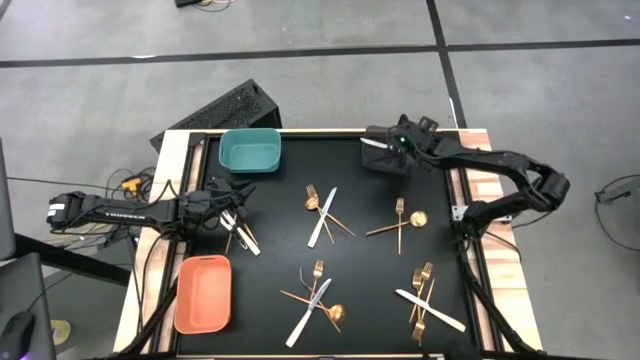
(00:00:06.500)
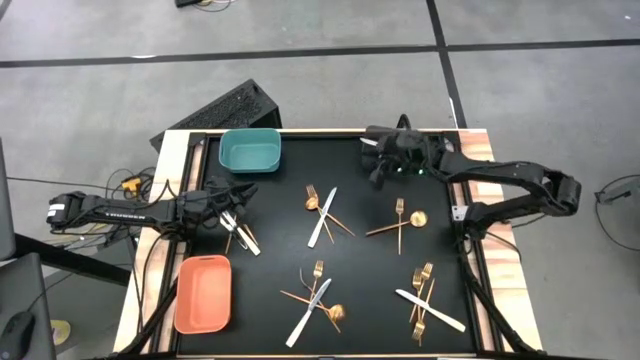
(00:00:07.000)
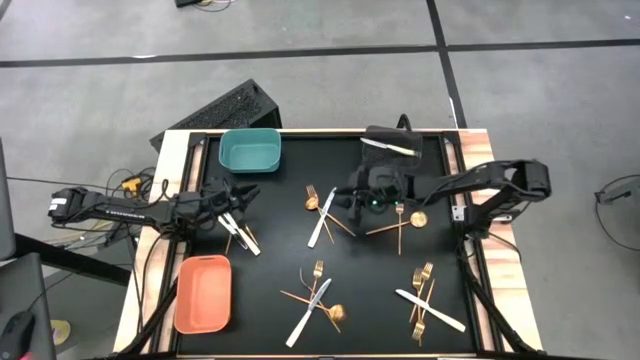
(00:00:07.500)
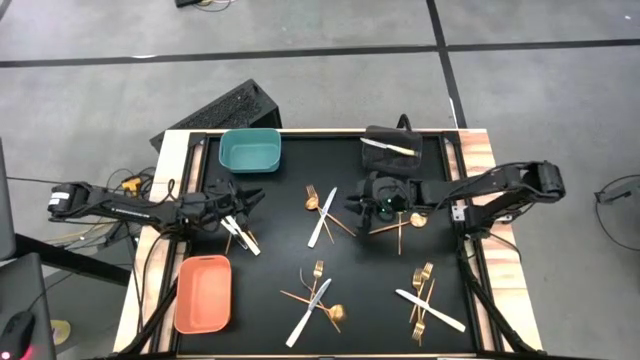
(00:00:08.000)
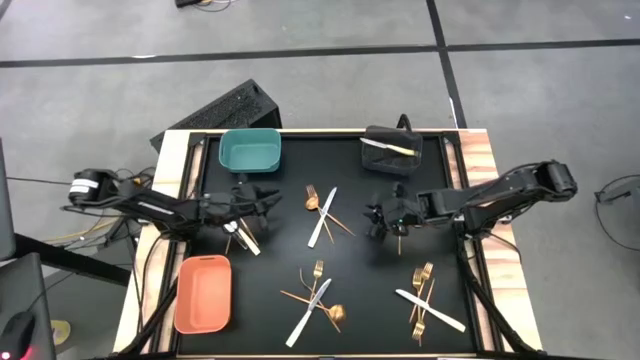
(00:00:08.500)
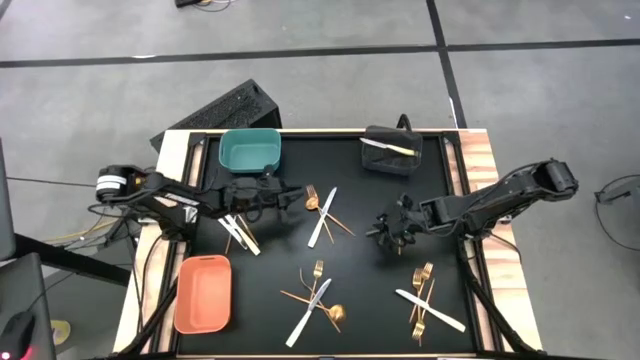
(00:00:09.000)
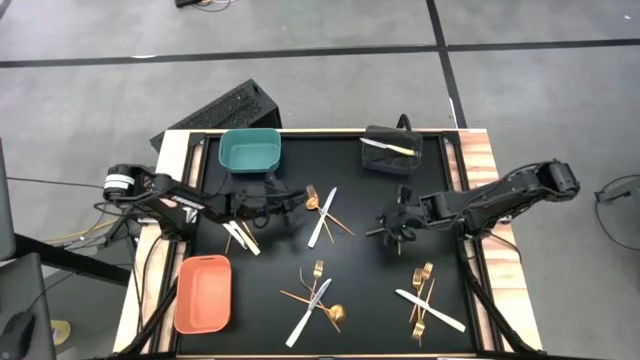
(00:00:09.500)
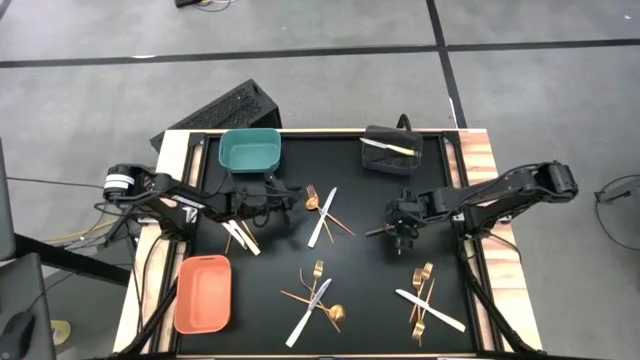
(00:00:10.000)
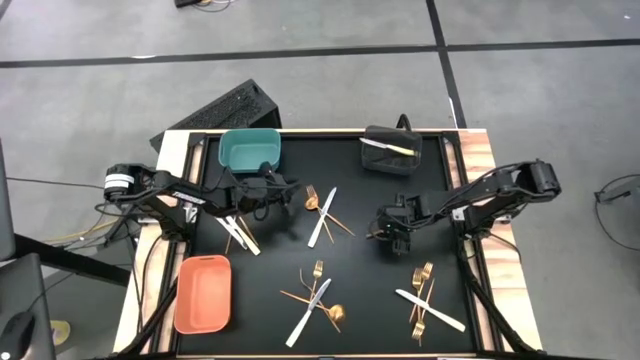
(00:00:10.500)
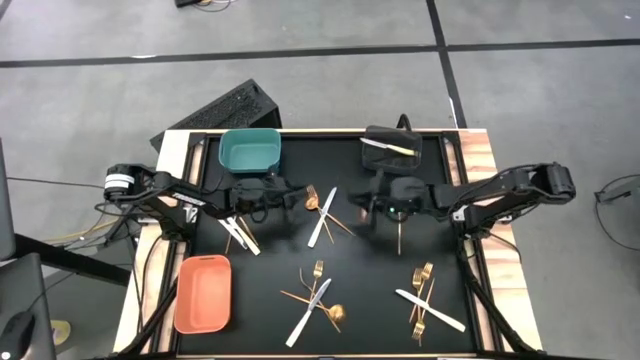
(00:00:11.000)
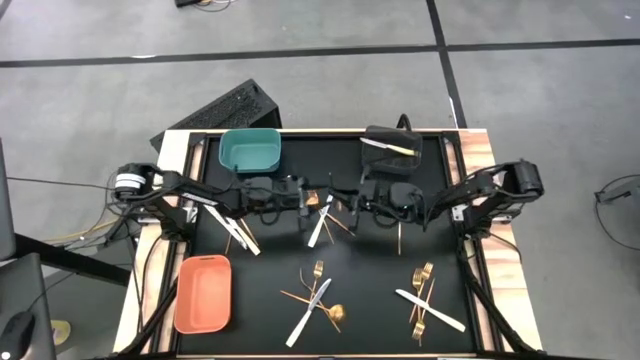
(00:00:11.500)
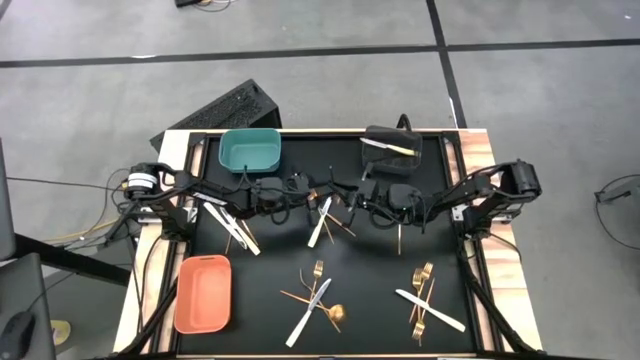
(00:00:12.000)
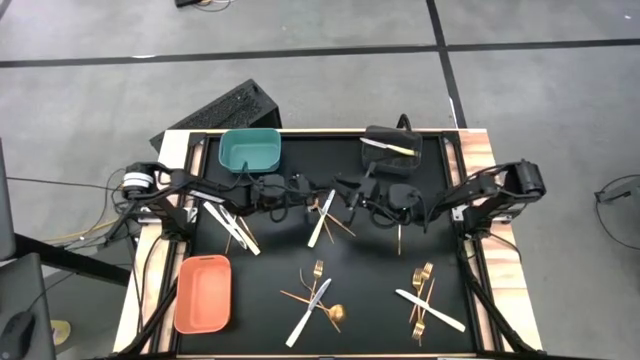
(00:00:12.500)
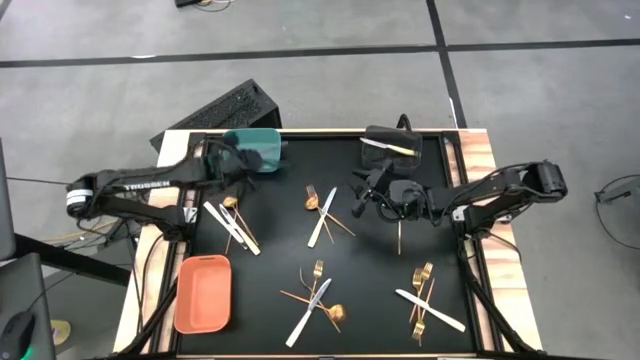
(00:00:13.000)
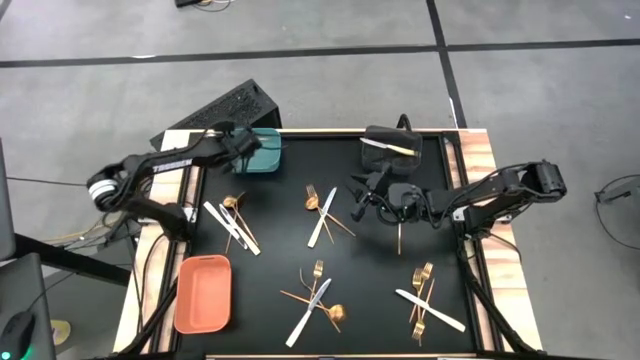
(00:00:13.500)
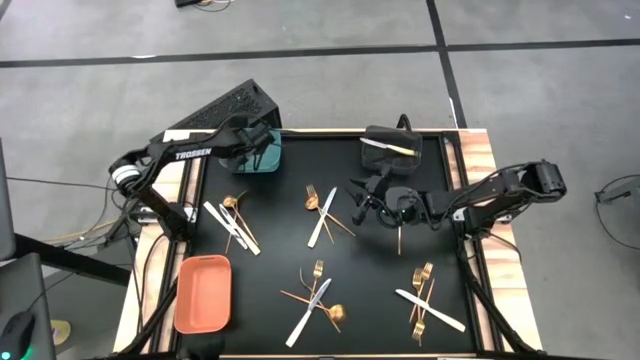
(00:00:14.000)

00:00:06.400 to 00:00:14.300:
Task: Sort silverware by color (type)
Put the gold spoon into the green bin

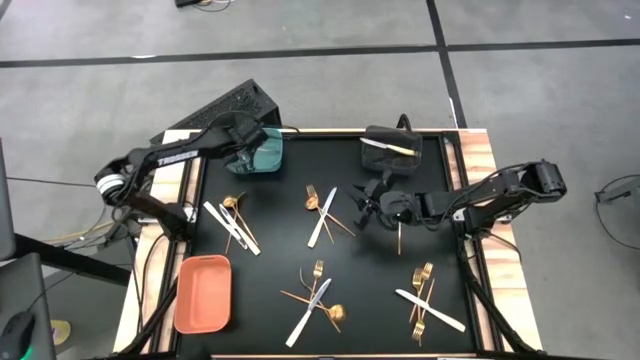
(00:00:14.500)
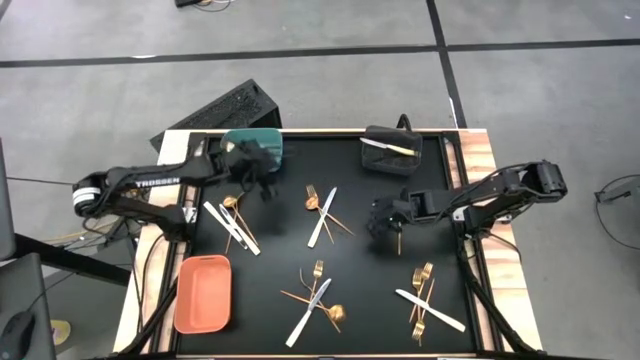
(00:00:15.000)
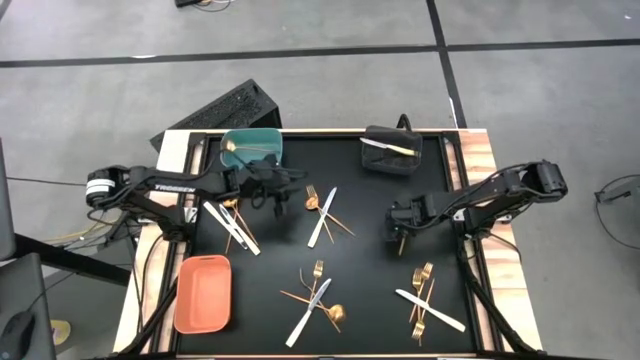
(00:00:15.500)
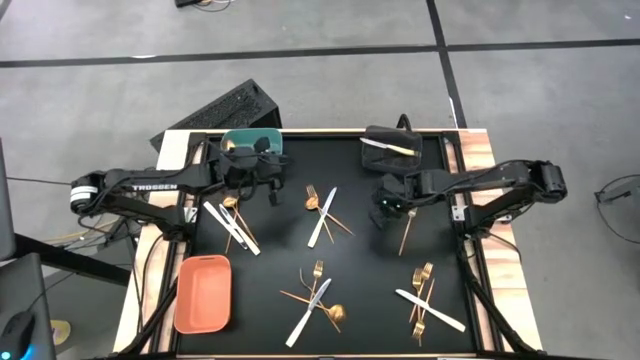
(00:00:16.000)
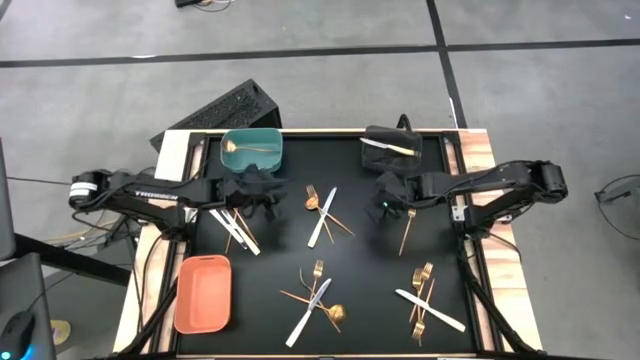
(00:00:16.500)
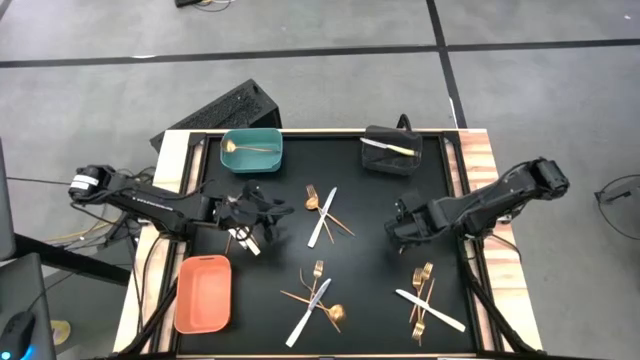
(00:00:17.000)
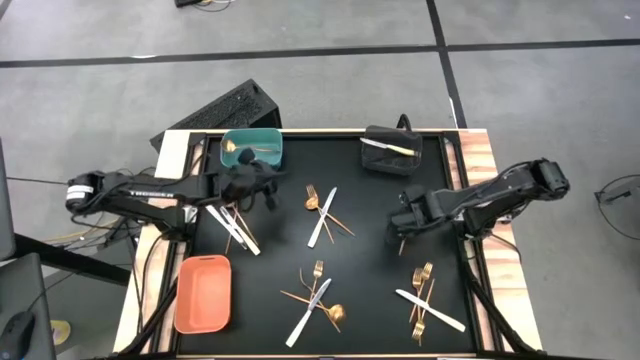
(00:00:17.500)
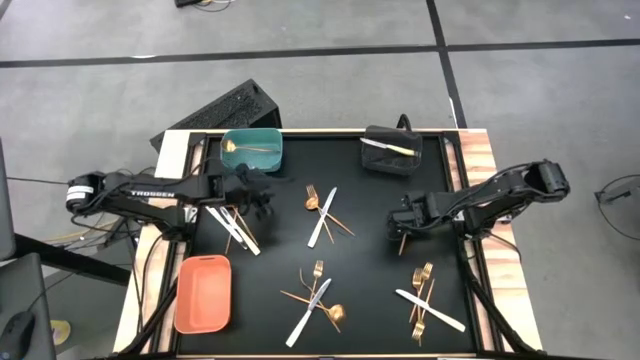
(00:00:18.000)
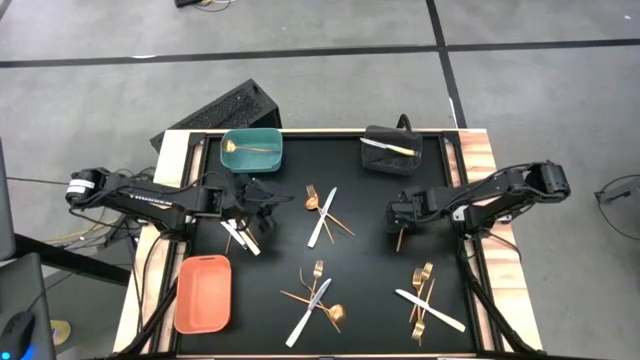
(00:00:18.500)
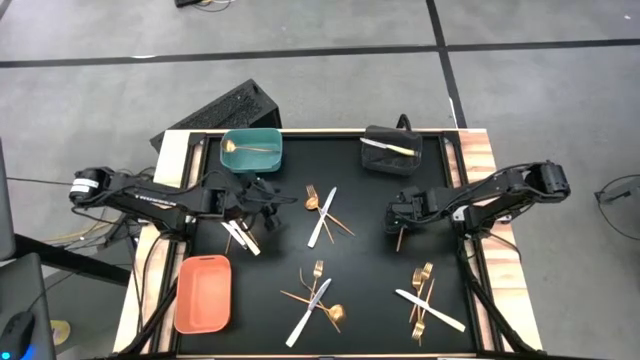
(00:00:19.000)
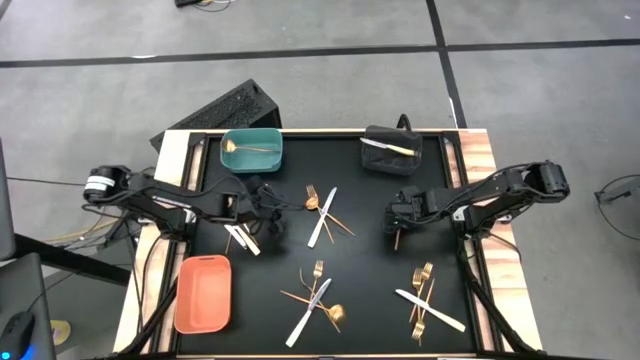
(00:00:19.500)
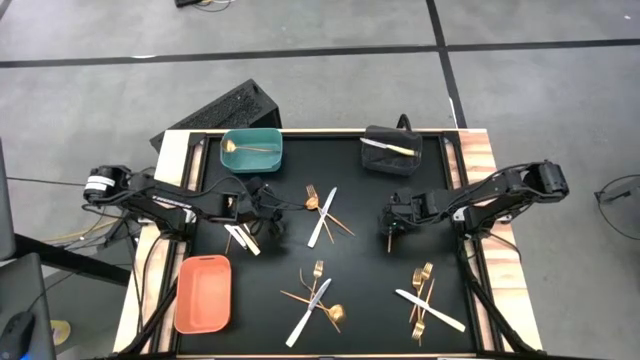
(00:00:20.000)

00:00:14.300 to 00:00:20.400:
Put the gold fork into the orange bin

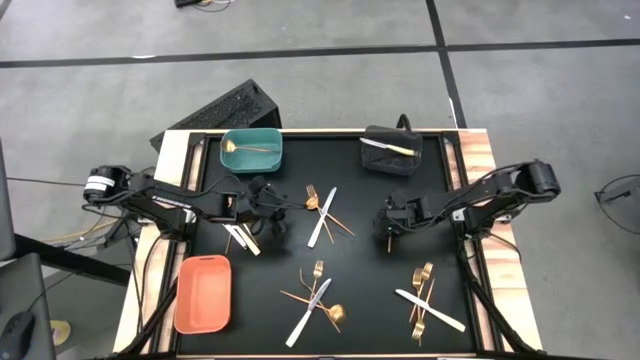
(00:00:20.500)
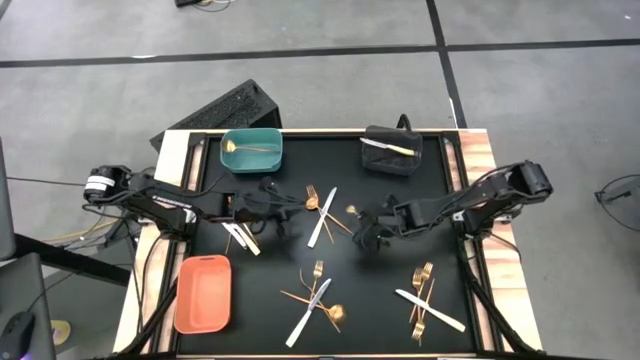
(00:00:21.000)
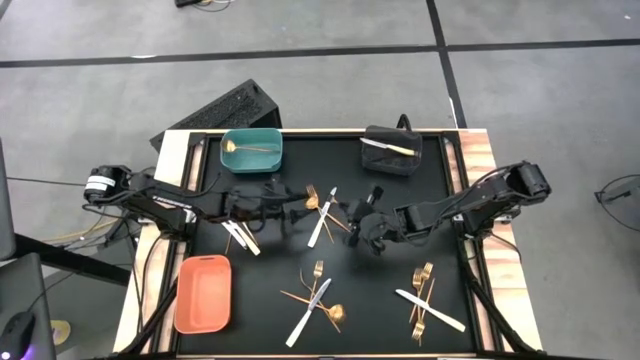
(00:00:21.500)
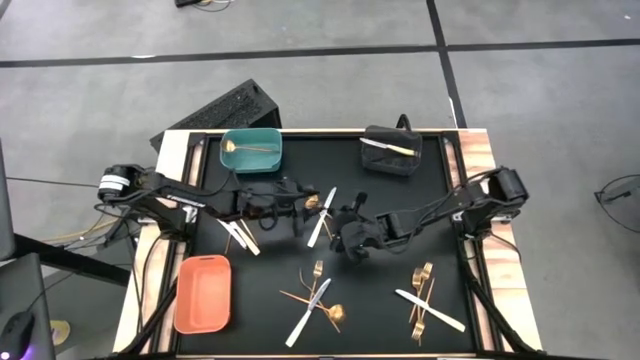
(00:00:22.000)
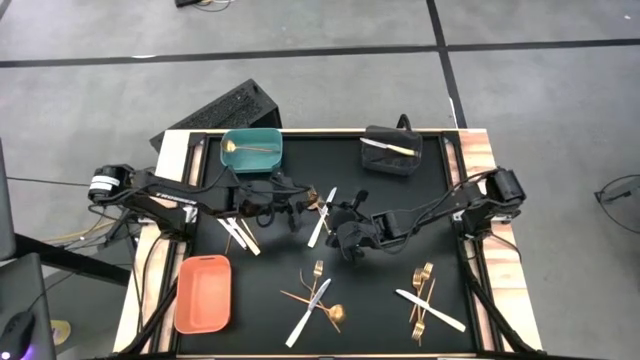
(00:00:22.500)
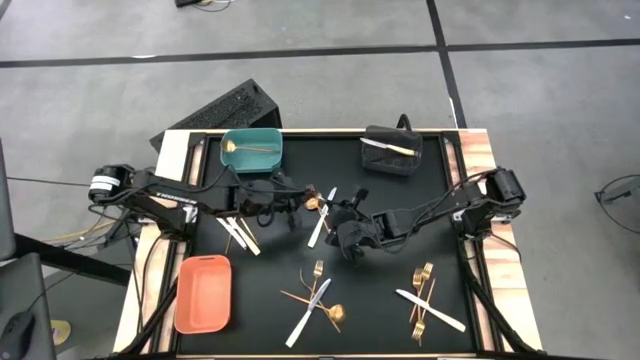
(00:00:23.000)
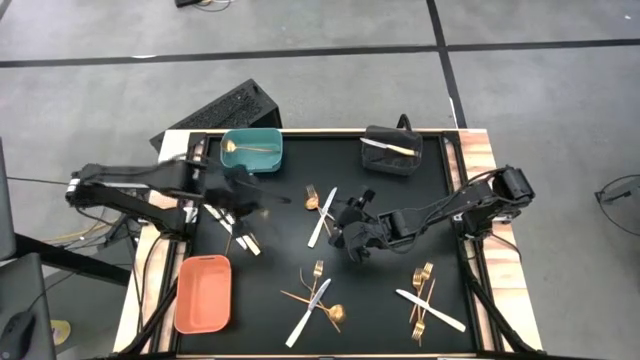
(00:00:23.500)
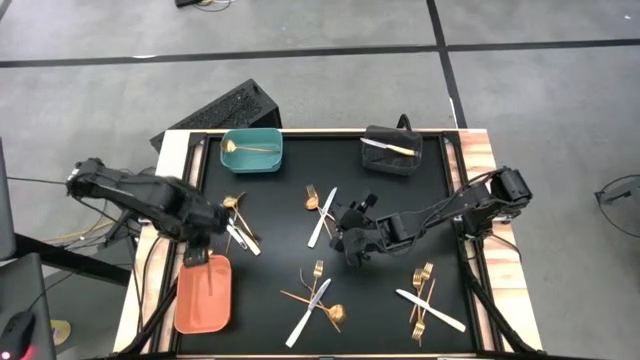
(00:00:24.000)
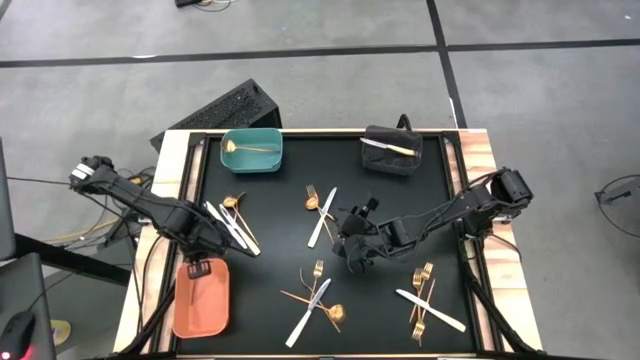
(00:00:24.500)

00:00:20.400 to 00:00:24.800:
Put the gold fork into the orange bin

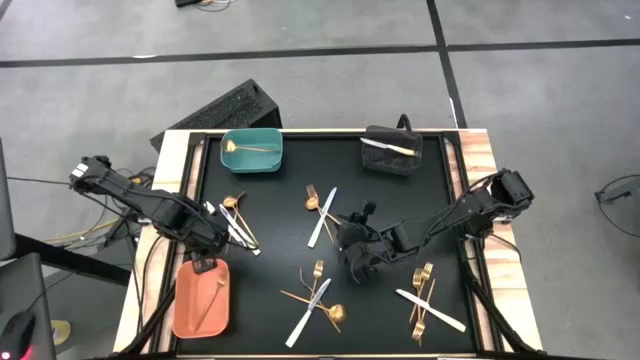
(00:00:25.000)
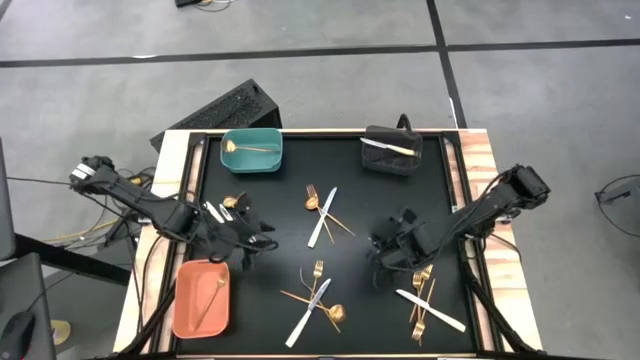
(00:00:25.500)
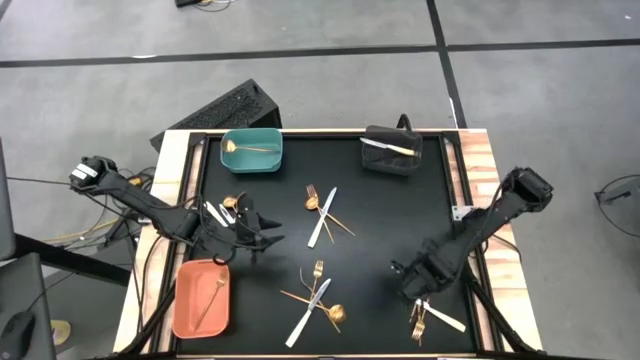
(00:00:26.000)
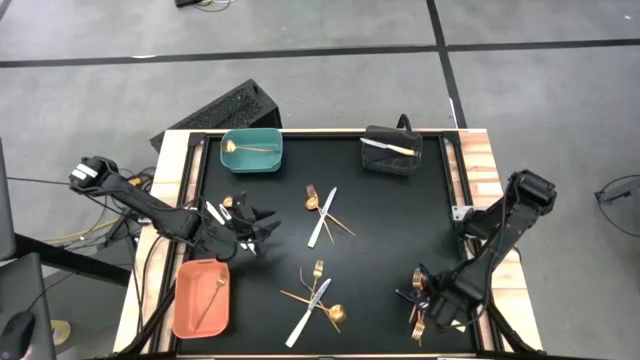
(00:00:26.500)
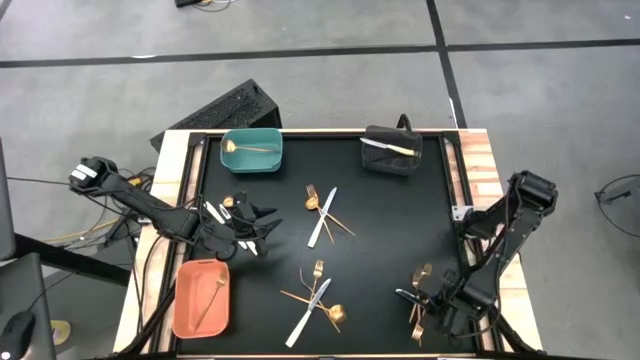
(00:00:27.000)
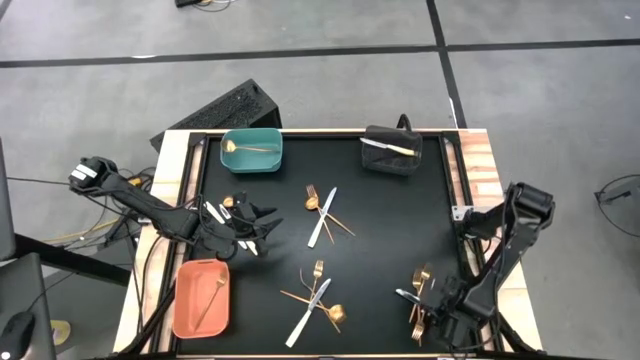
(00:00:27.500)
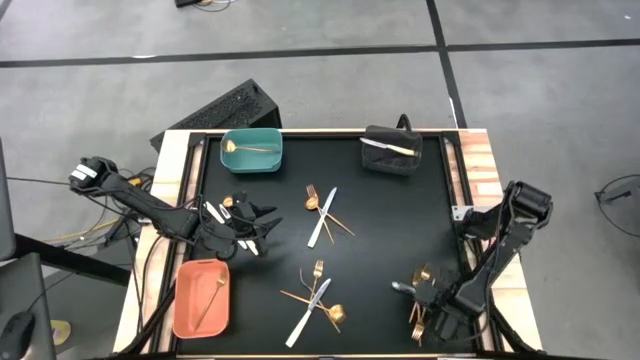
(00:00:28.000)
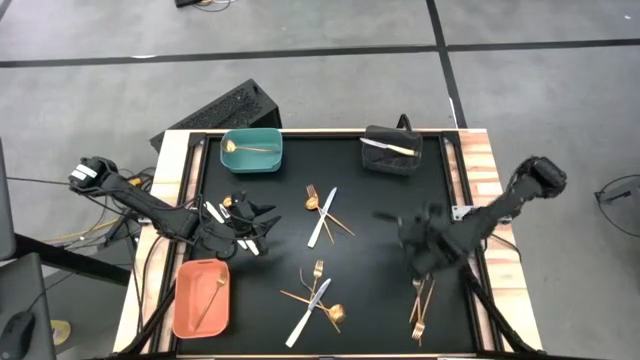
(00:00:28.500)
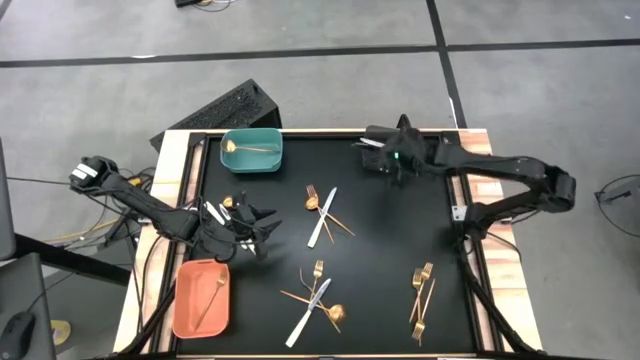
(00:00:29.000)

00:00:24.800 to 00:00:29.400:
Put the yellow table knife into the black bin
